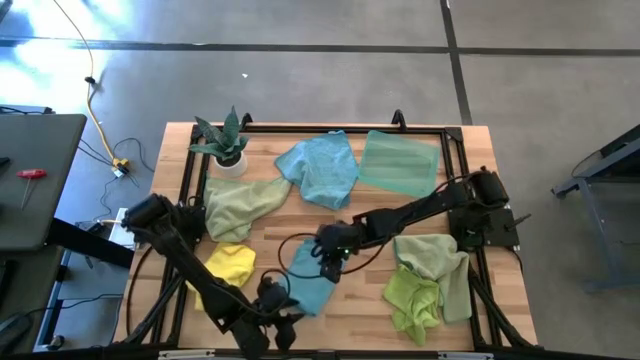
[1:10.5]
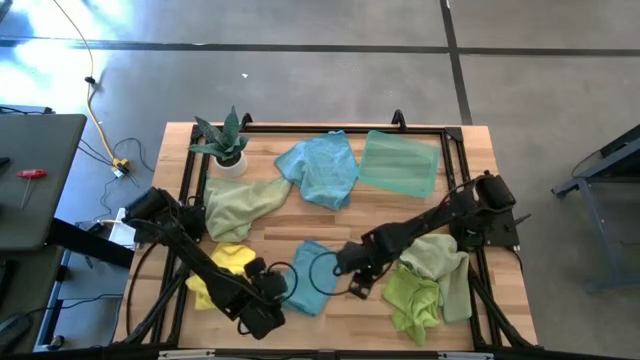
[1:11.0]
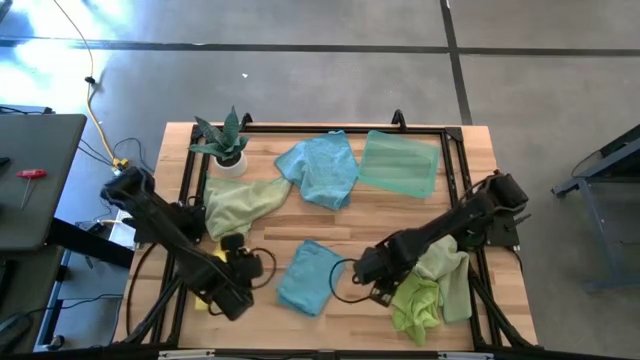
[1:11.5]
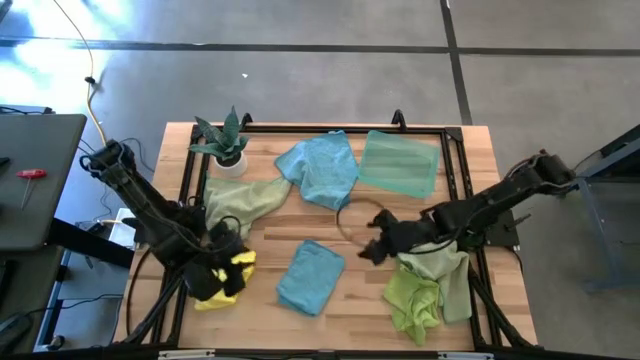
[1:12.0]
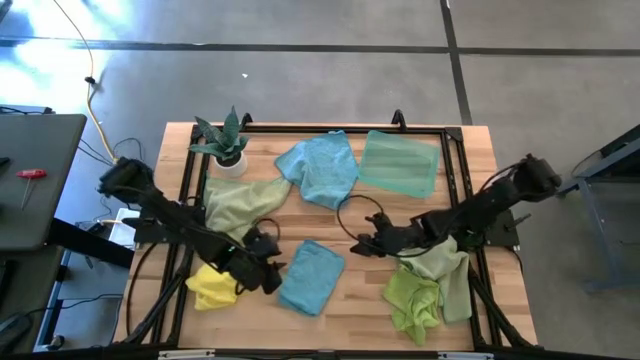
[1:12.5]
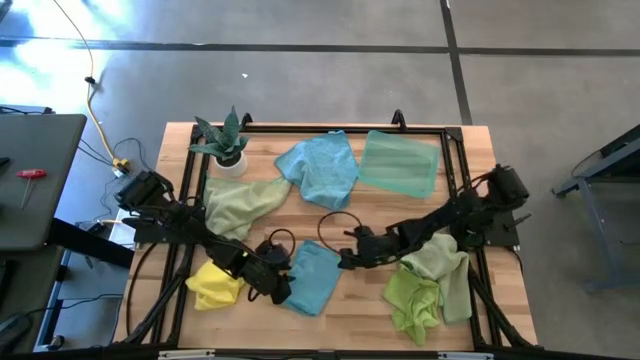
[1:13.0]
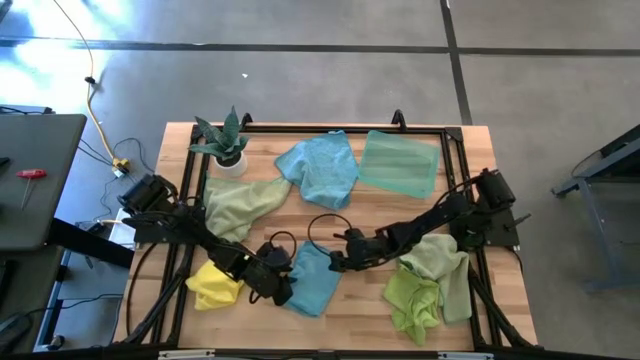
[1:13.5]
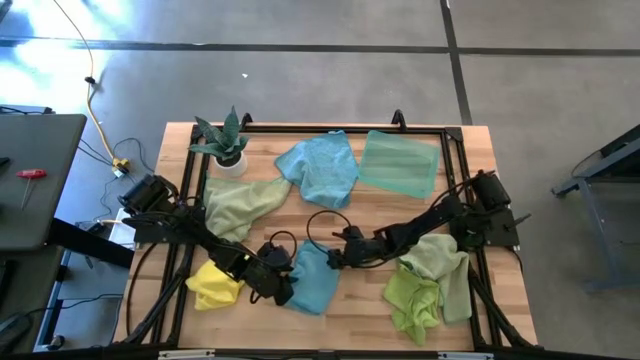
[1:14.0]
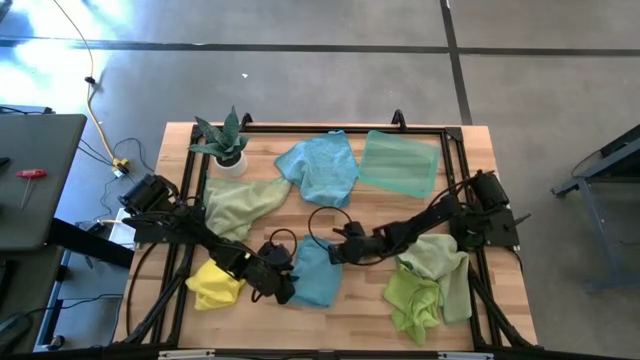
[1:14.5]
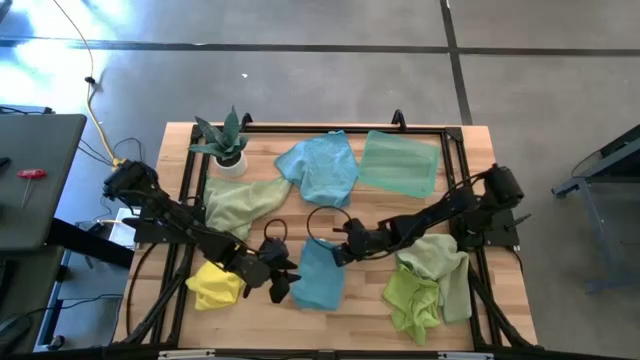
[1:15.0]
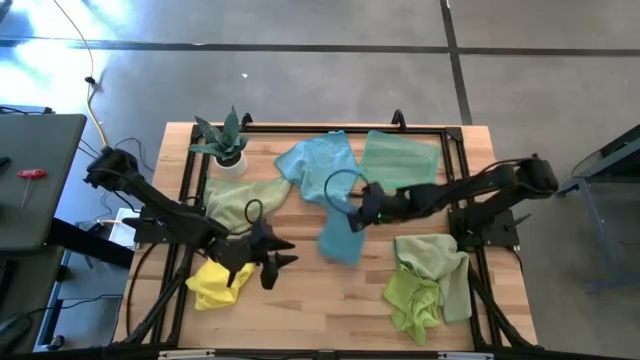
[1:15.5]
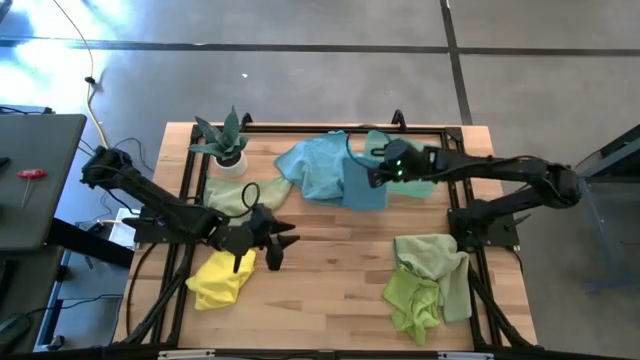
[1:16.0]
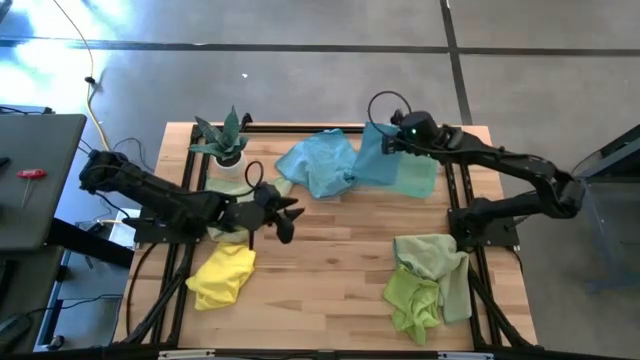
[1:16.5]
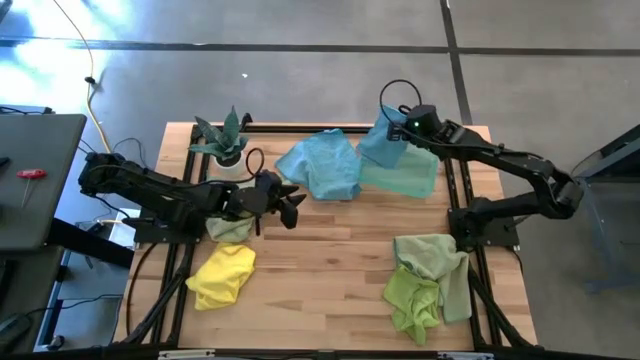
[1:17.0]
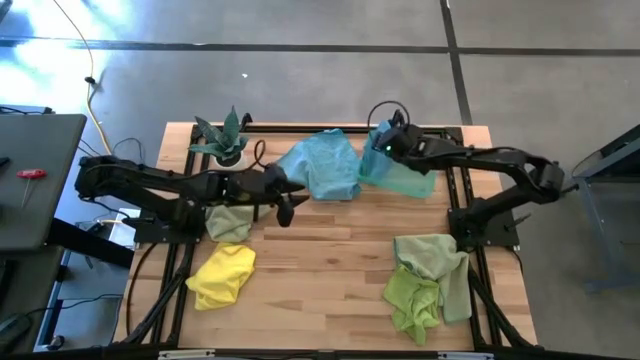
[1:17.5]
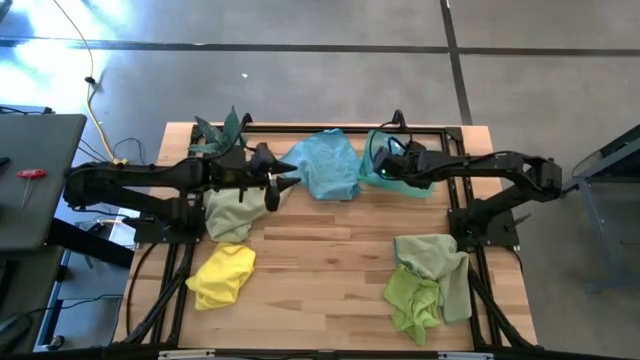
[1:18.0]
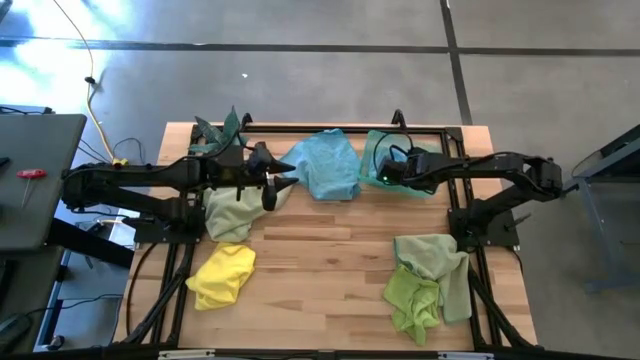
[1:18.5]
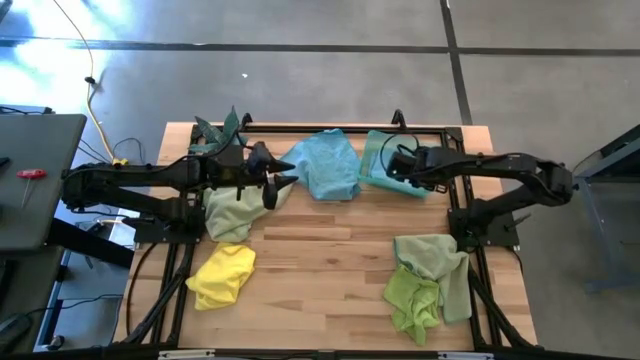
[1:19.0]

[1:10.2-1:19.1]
Task: Fold microfiber towels
Put the bottom blue microfiber cloth into the green bin

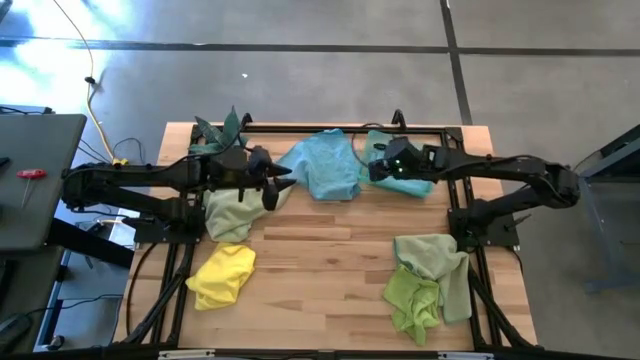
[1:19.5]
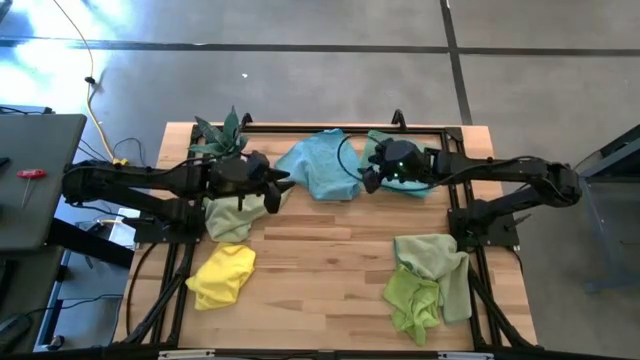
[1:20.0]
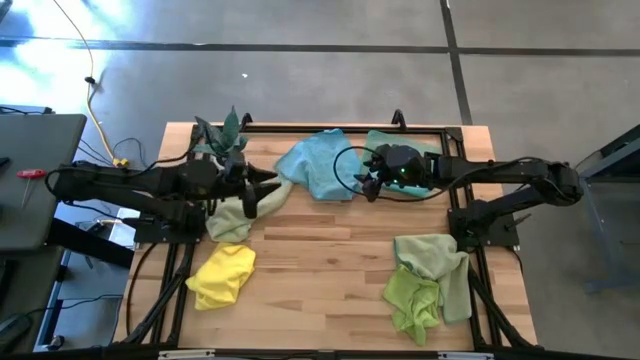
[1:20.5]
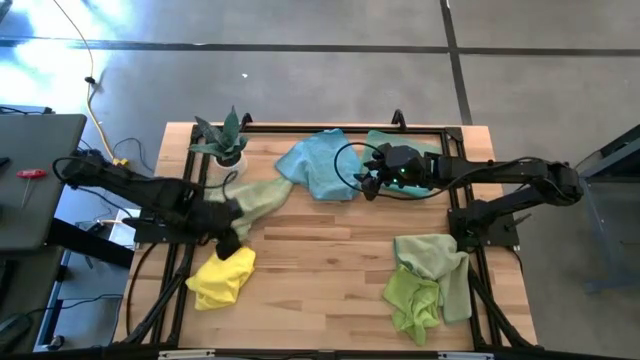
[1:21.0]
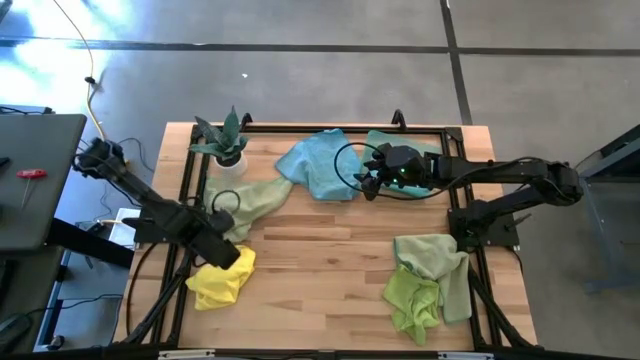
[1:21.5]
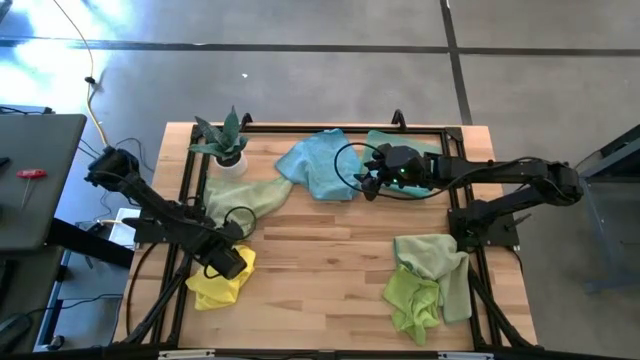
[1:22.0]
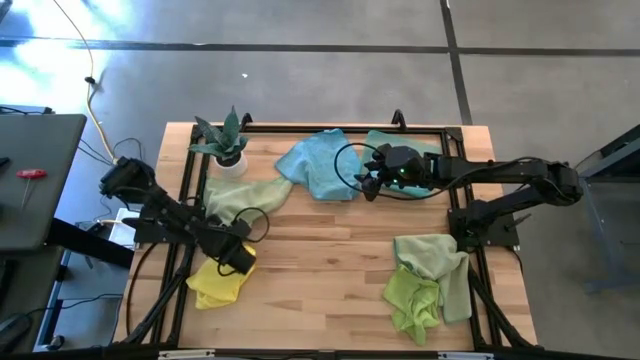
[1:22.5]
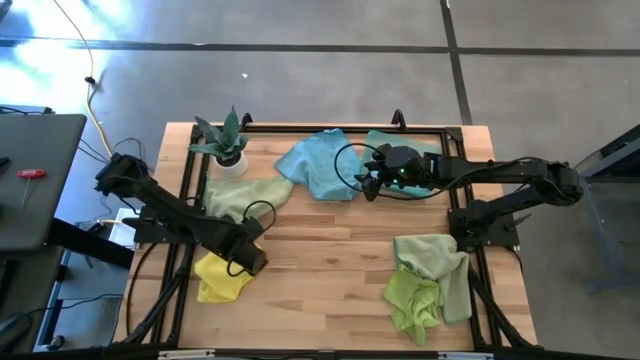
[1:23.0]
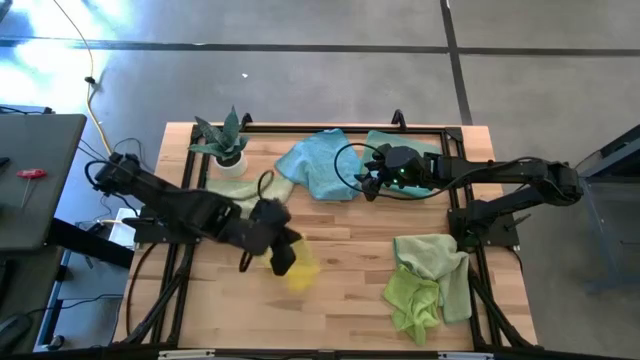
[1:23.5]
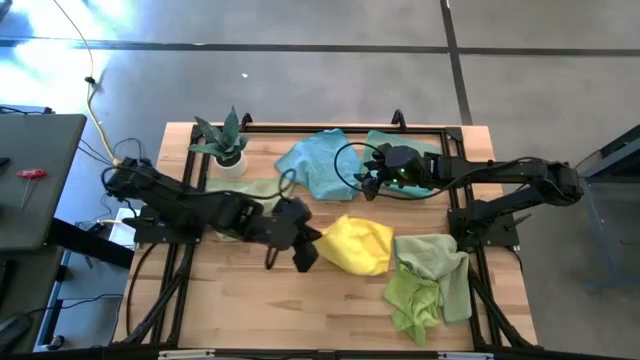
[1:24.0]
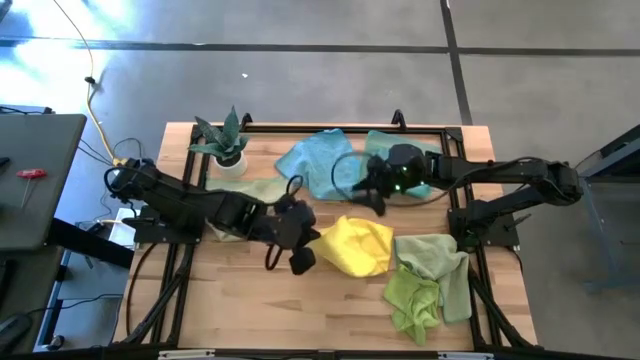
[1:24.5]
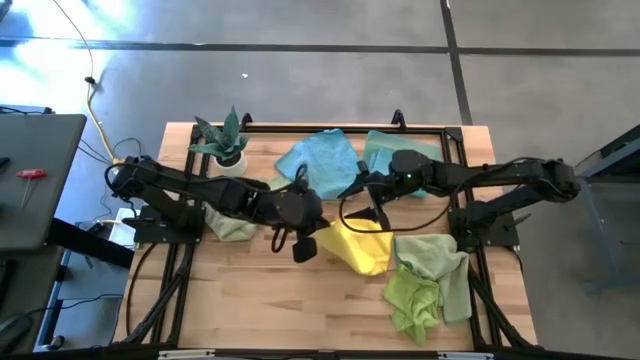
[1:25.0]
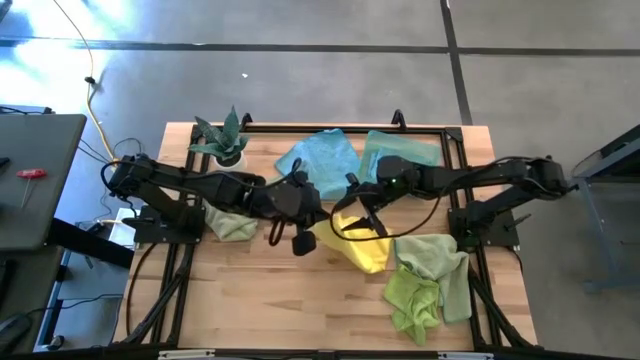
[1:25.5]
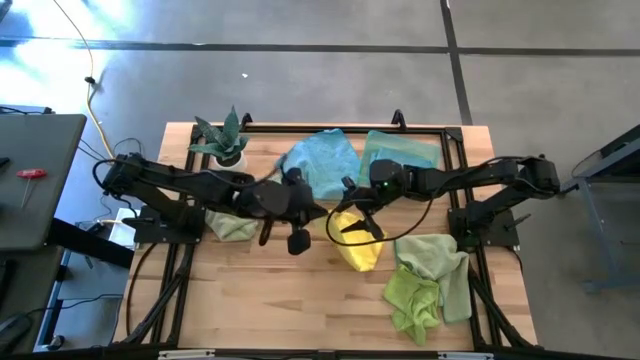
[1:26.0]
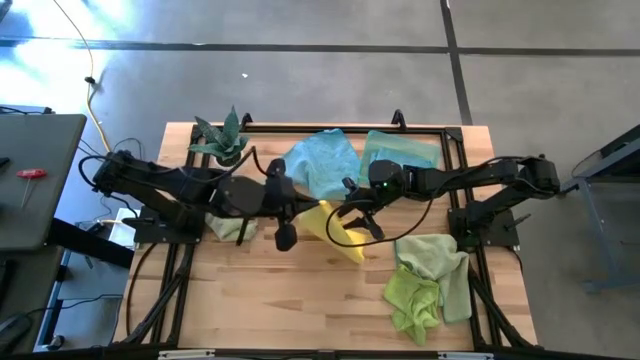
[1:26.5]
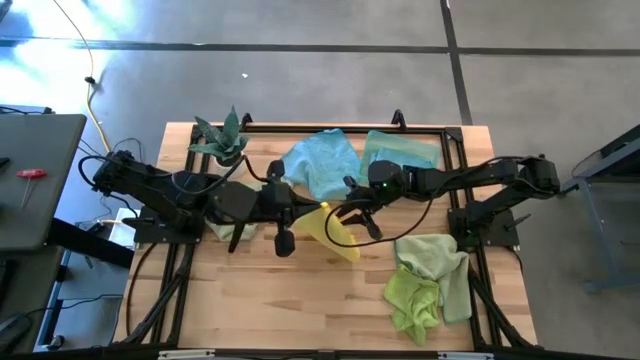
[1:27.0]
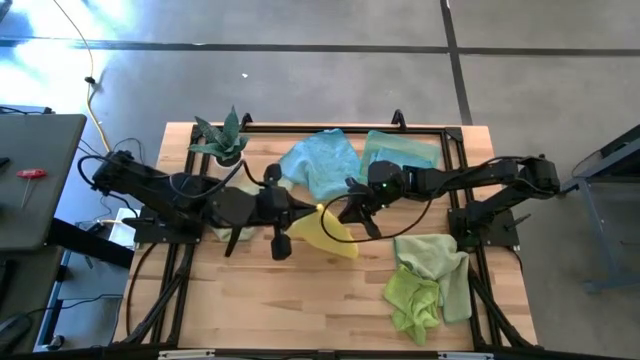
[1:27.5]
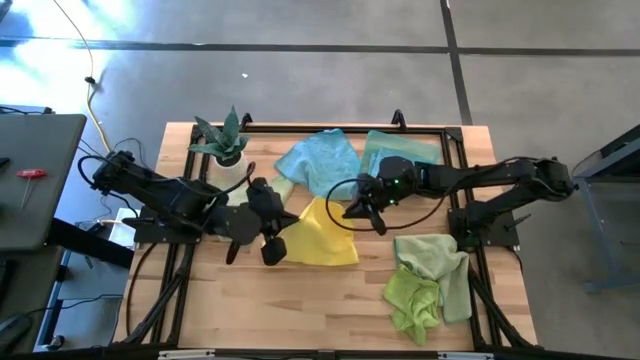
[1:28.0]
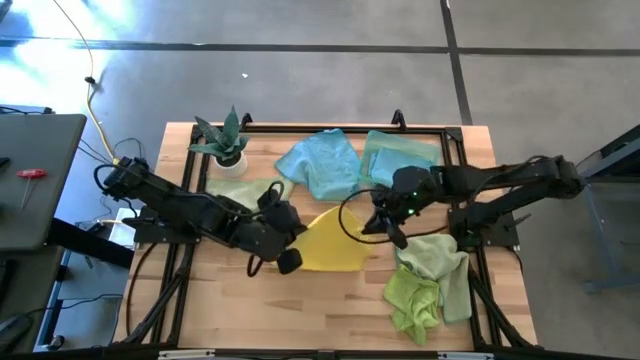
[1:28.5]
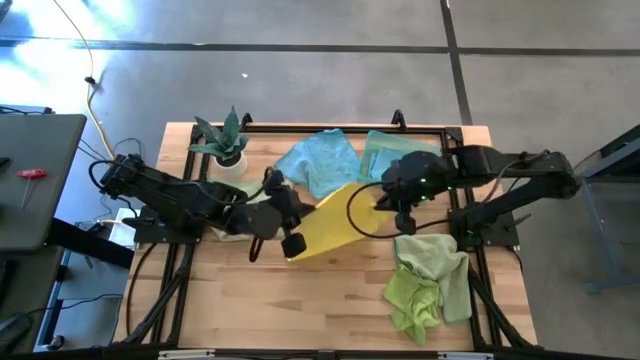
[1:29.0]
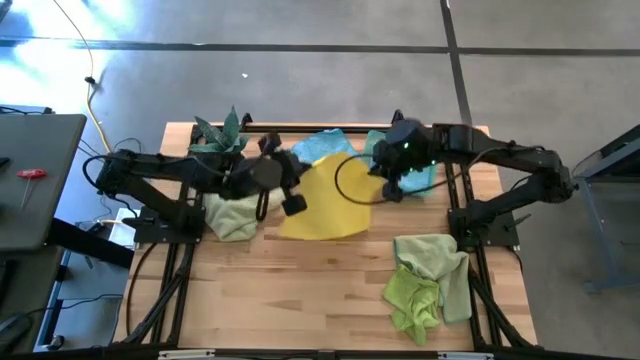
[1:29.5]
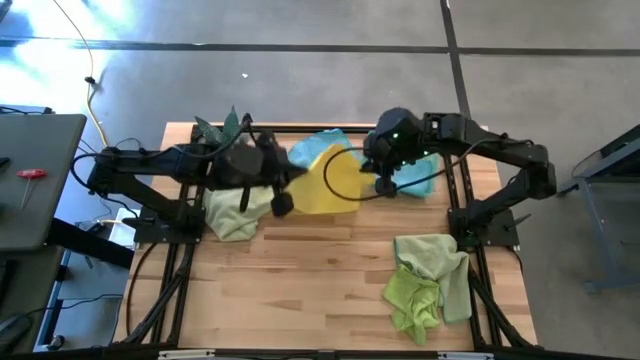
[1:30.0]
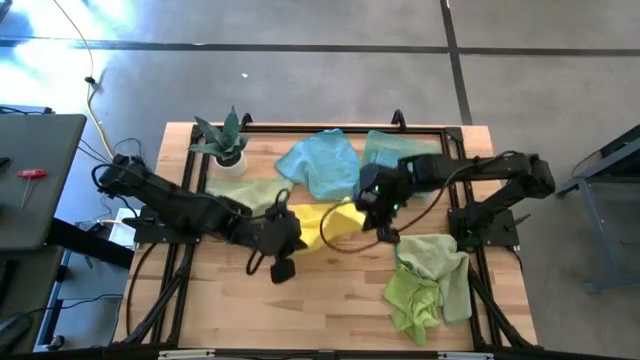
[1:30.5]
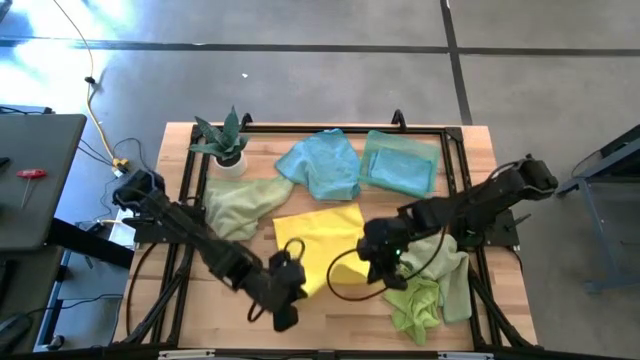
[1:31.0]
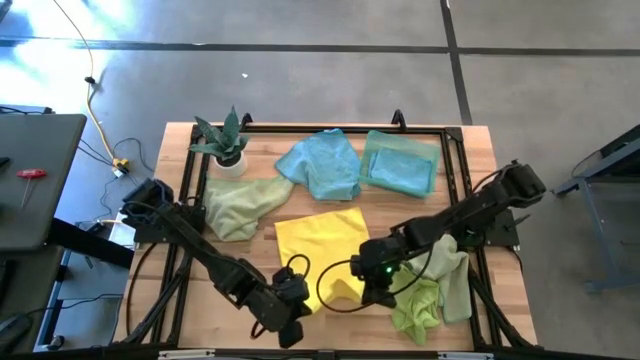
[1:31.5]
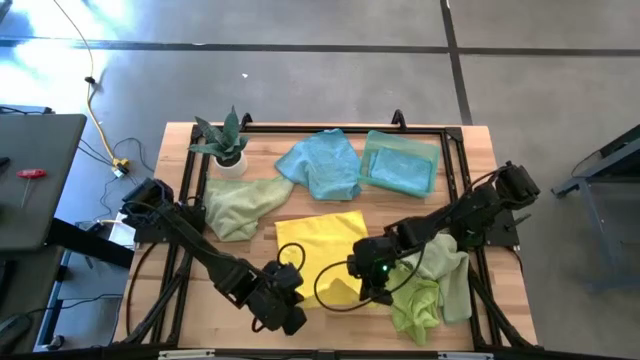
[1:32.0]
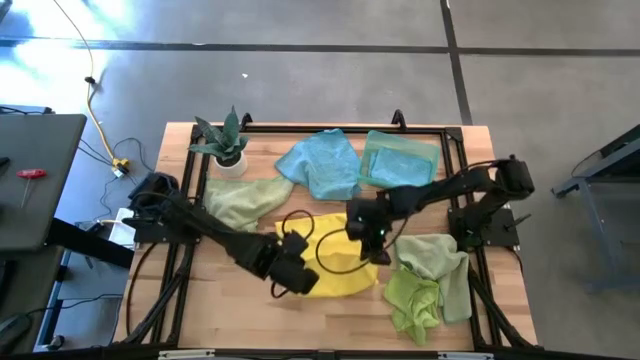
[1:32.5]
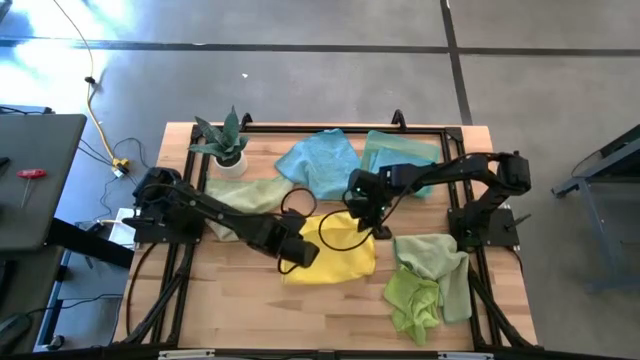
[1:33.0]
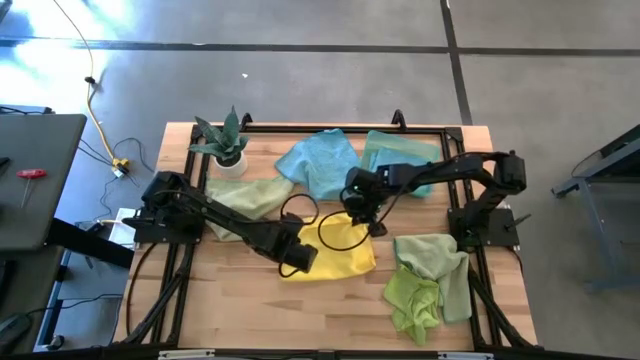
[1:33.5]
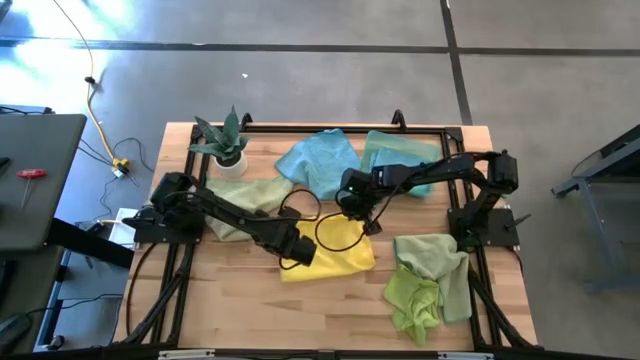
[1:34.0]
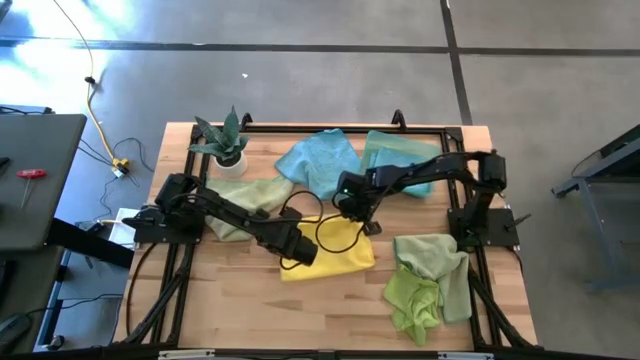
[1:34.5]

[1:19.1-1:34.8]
Fold the yellow microfiber cloth
